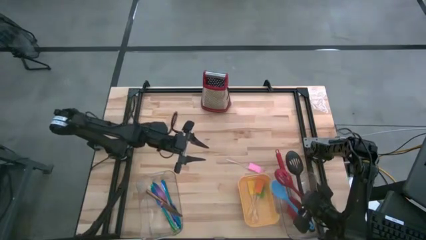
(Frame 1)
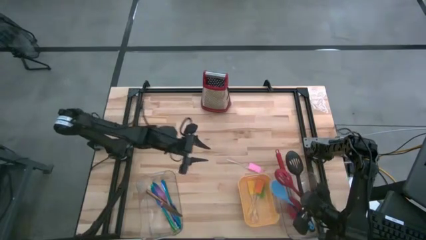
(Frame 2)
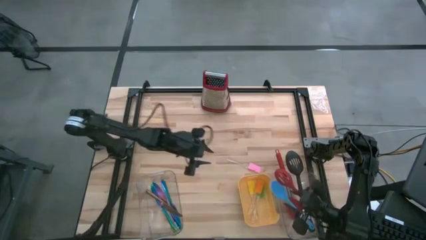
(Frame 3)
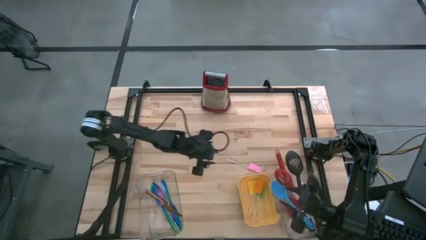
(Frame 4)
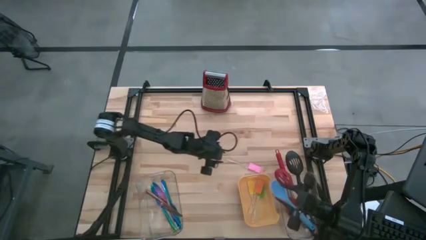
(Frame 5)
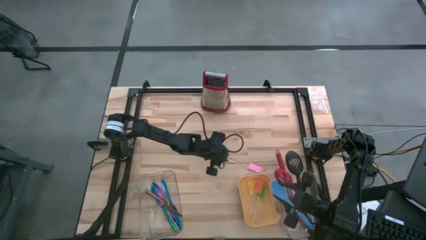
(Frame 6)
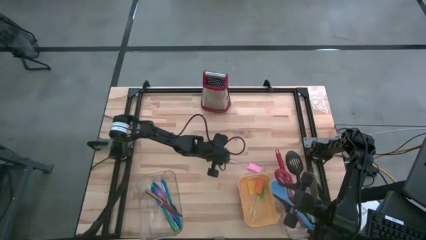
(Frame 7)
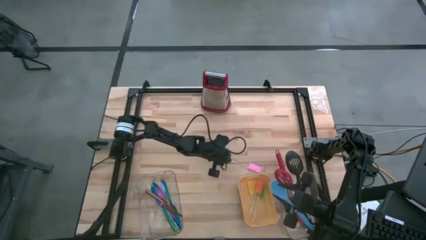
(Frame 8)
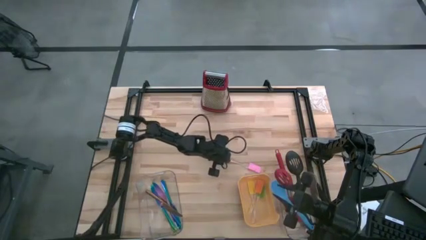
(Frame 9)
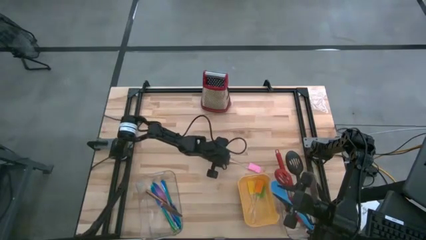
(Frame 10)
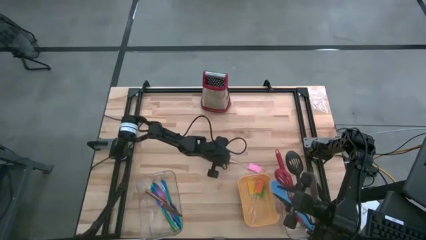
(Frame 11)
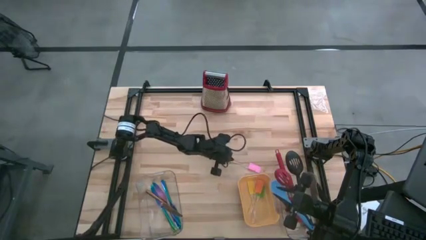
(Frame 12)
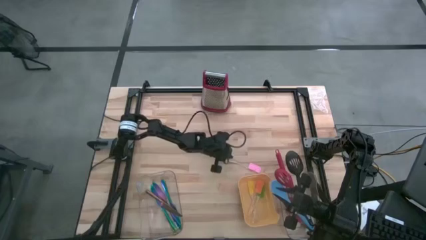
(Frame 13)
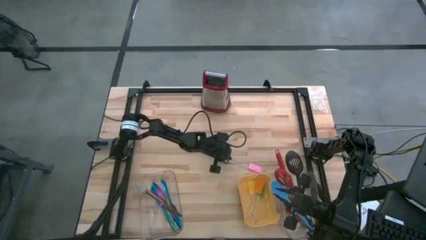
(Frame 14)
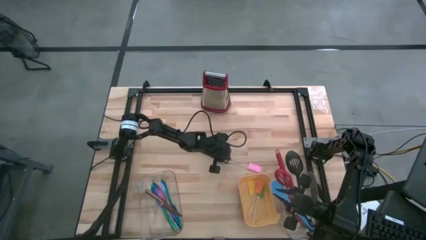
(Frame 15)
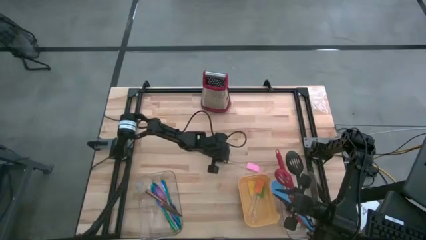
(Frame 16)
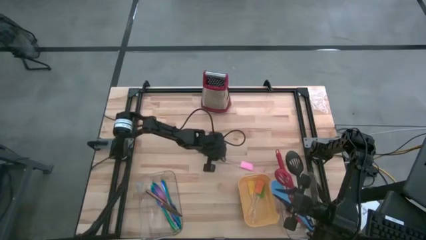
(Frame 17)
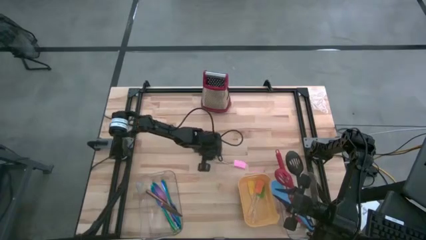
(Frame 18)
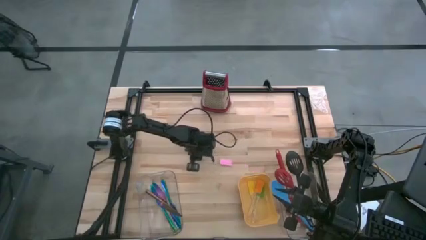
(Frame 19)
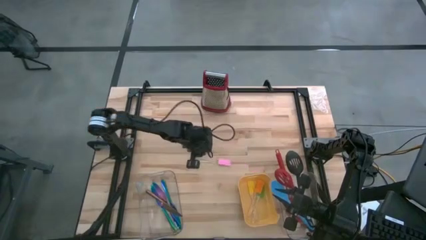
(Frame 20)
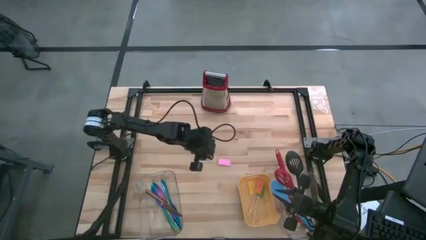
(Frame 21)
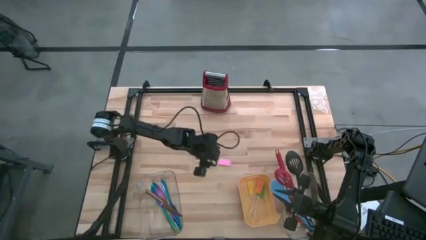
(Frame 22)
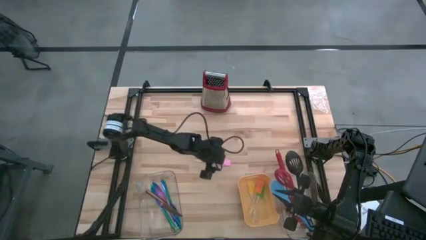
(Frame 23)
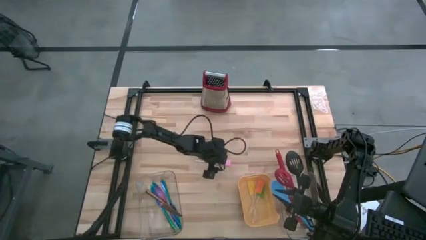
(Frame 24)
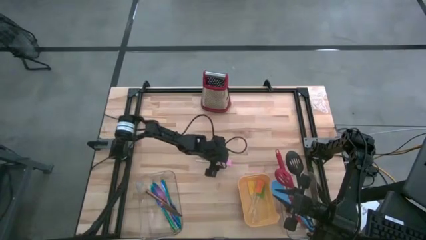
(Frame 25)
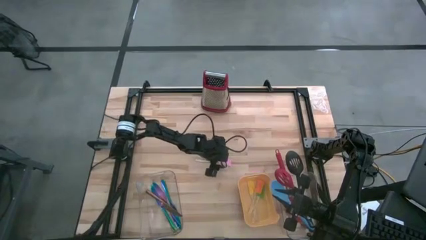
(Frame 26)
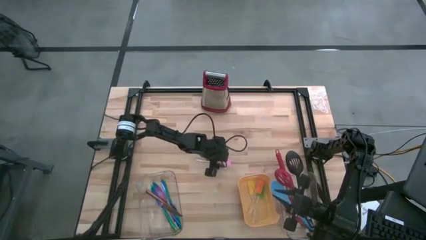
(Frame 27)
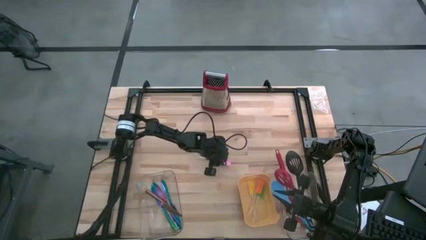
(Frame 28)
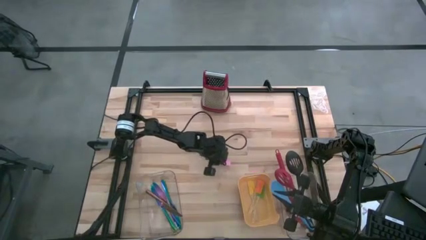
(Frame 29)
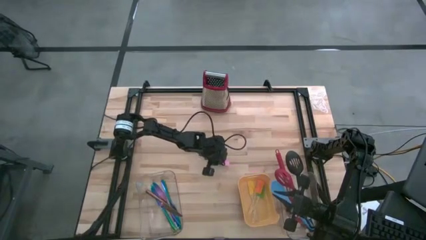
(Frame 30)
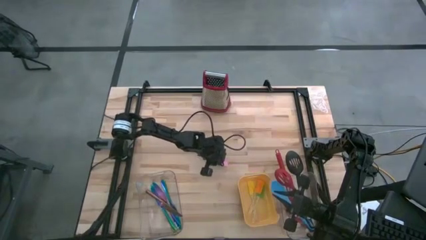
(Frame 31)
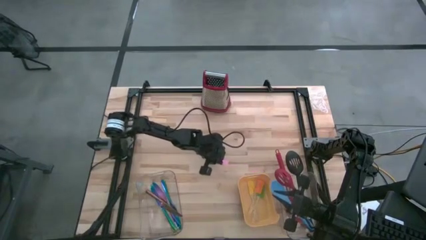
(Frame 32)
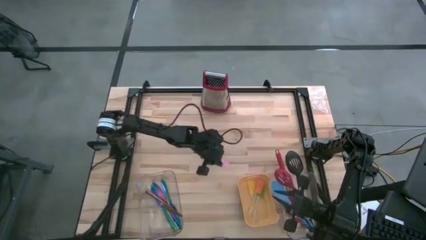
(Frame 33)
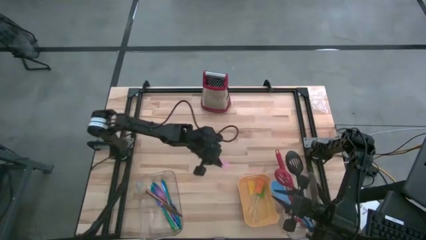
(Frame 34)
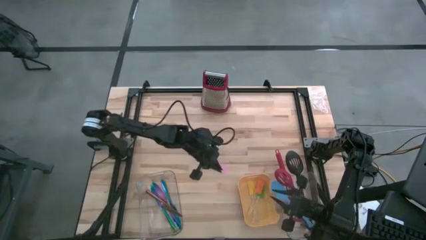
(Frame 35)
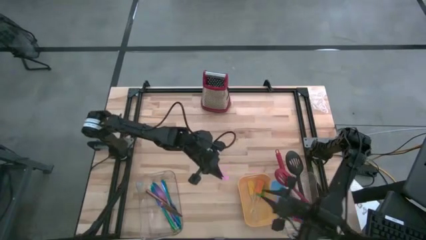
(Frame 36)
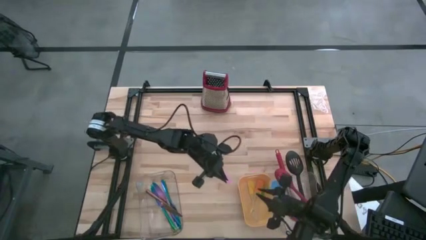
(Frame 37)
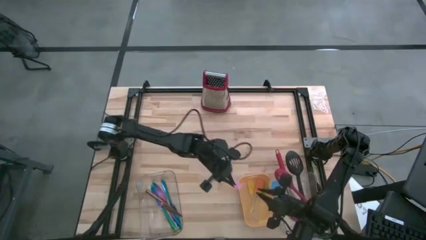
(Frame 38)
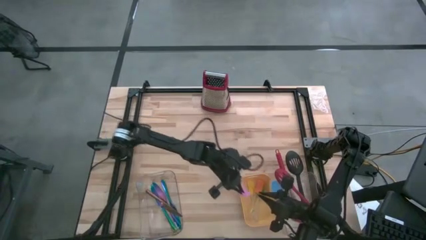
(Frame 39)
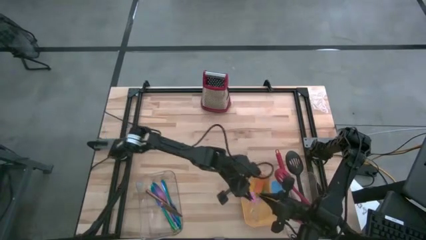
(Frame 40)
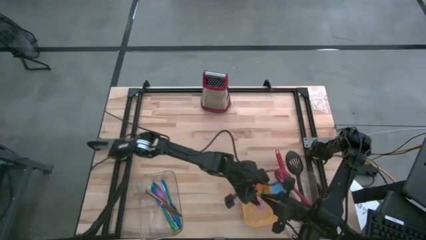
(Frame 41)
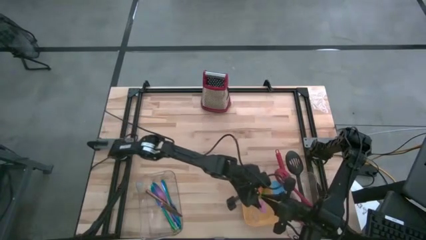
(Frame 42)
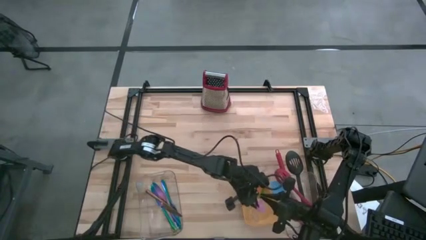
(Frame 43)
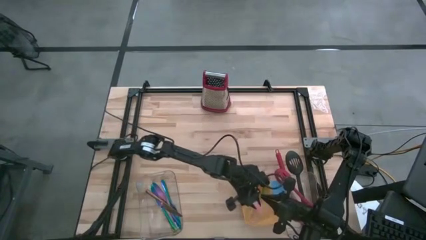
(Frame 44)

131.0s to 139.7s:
Task: Pick & Place Kitchen Items
Put the pink spatula into the yellow bin

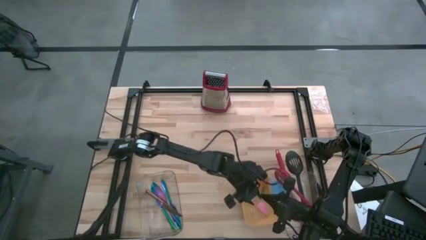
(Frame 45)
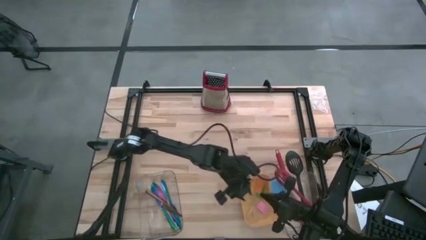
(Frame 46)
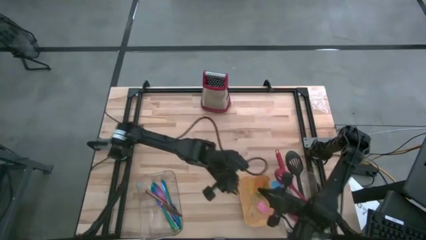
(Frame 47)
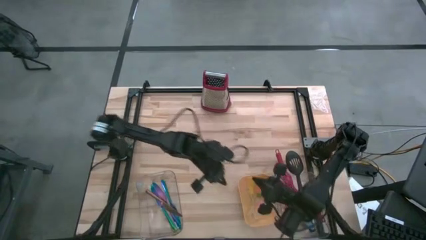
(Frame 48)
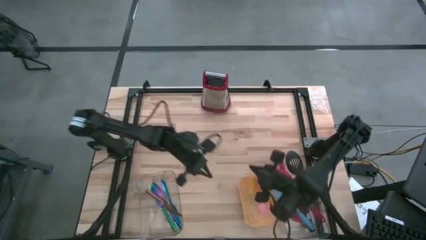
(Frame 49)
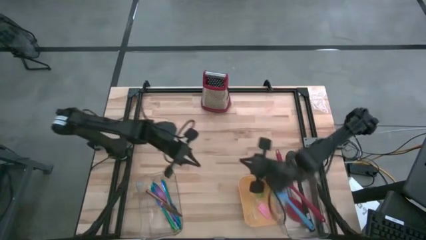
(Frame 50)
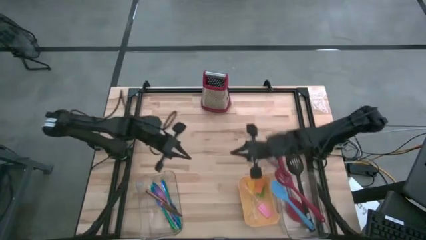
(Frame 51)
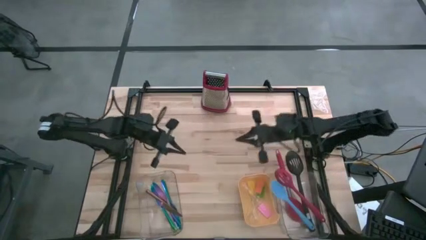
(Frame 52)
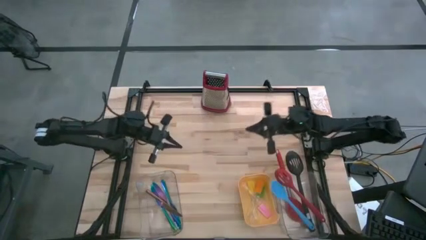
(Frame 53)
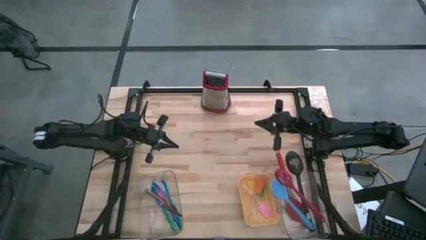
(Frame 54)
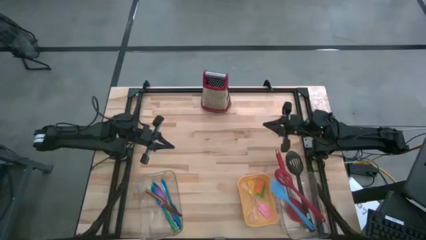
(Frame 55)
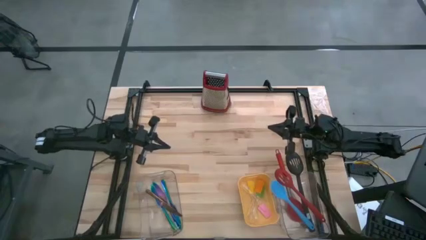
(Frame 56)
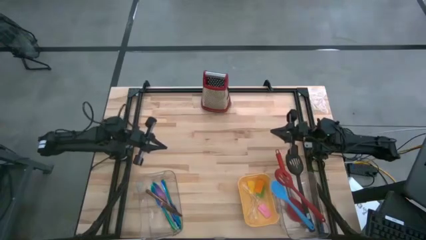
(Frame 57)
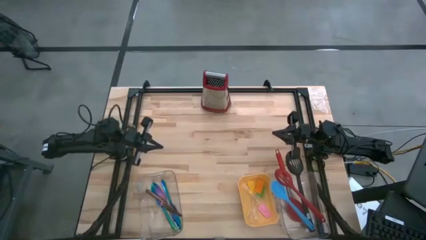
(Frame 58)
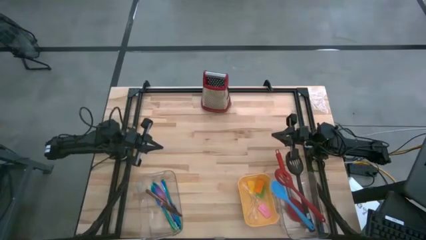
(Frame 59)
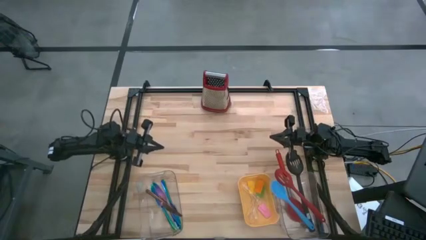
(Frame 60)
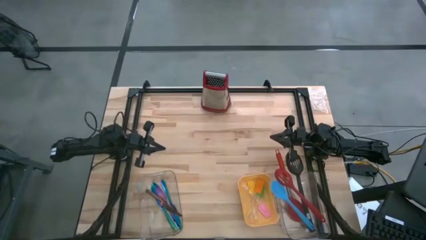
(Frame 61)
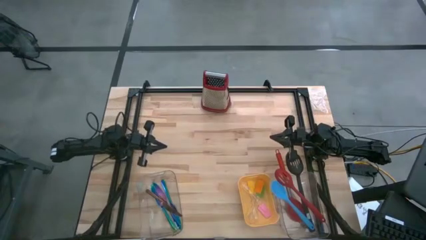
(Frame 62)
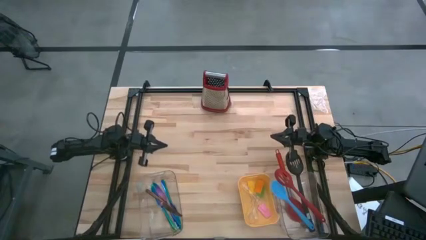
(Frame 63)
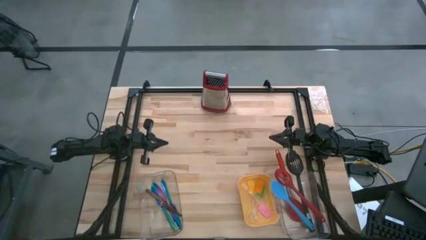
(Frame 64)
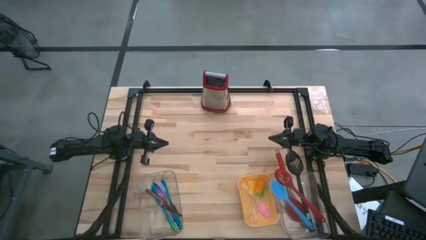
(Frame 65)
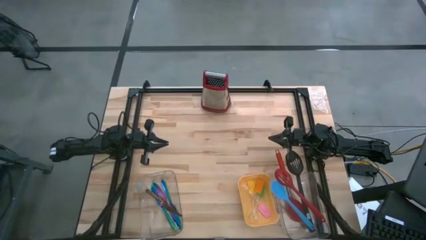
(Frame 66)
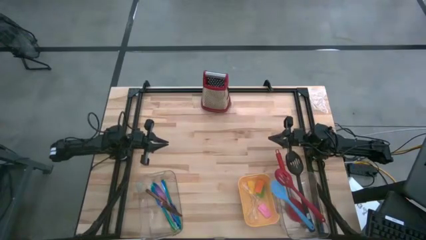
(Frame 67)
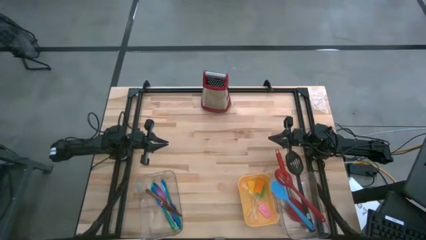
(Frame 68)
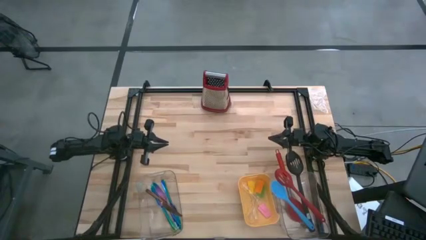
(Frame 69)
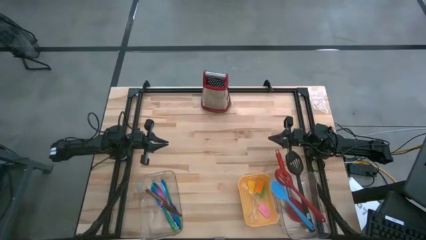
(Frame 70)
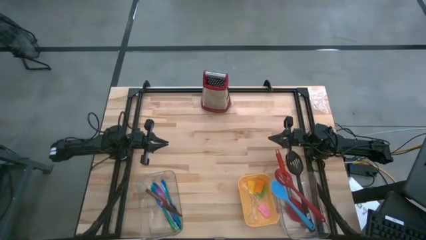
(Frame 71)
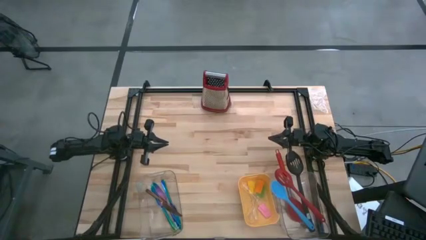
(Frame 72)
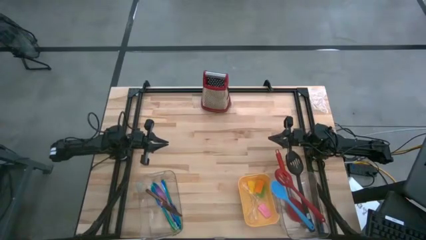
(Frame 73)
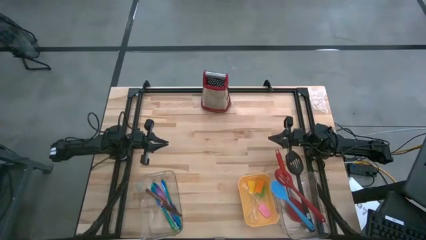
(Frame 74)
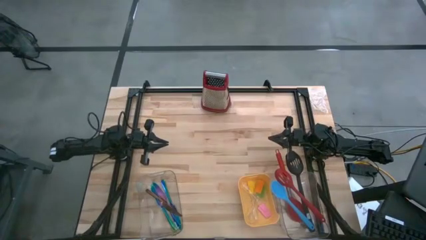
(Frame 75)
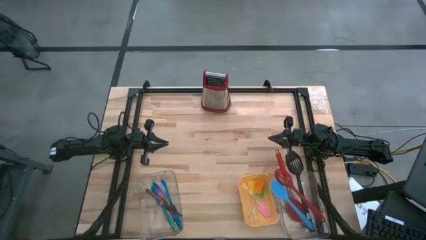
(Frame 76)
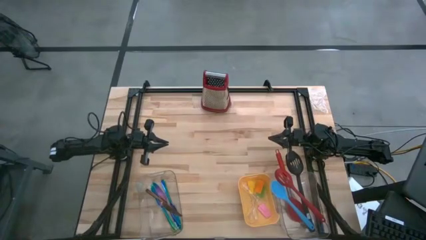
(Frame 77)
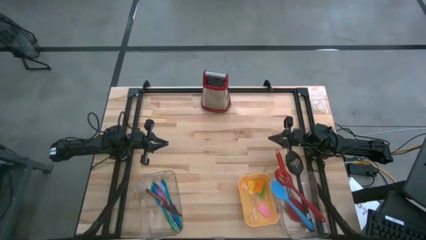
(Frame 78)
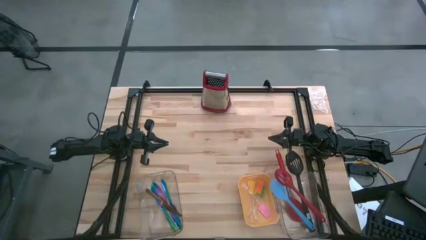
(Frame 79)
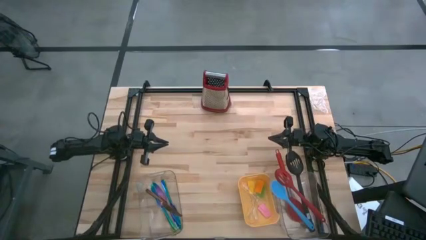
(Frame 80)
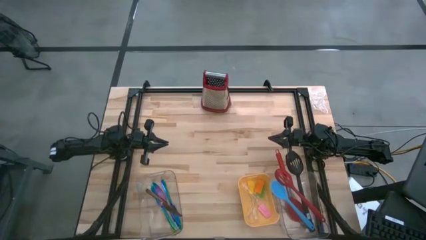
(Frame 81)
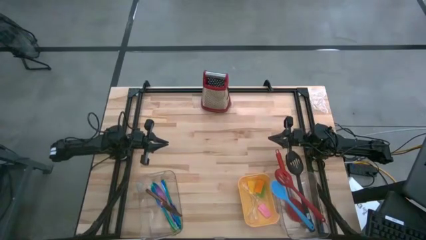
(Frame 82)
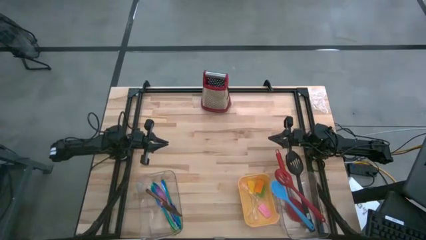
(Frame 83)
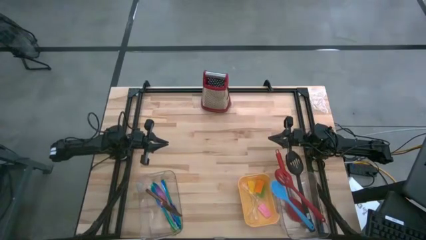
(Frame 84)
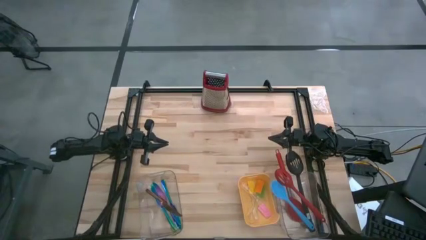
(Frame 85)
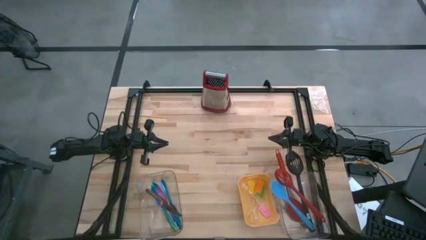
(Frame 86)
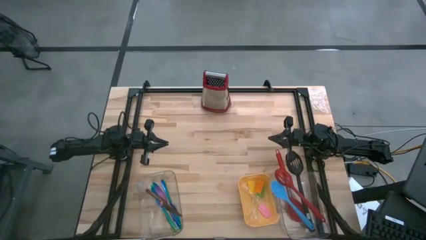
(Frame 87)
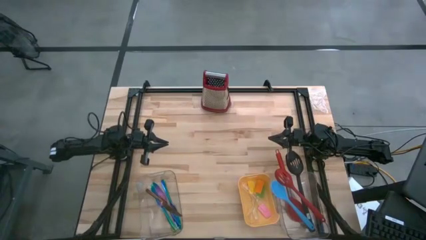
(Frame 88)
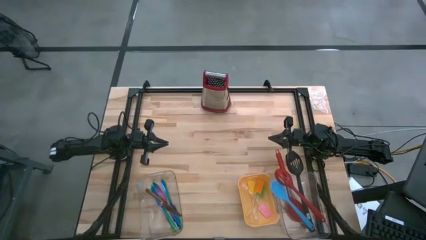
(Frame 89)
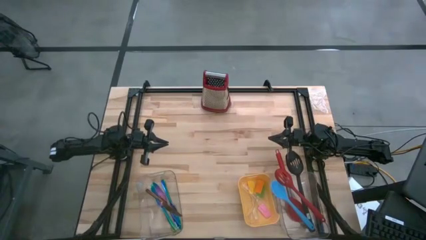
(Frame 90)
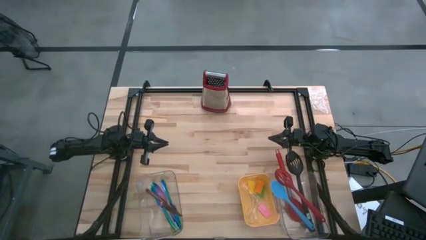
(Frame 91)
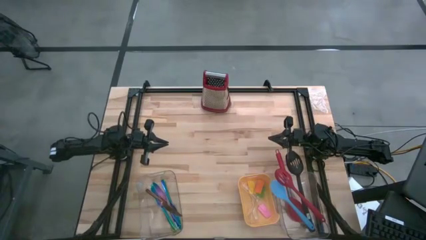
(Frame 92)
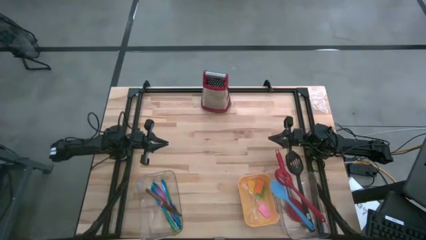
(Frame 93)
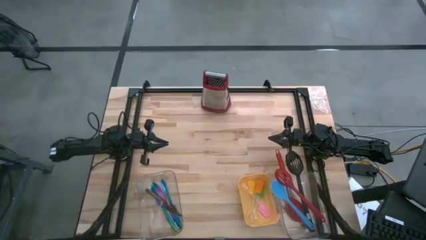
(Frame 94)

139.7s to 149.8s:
Return to Home Position
